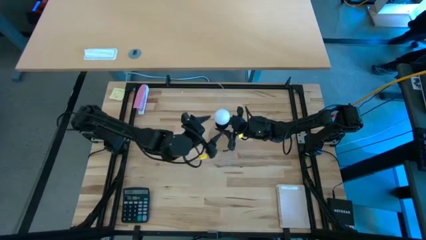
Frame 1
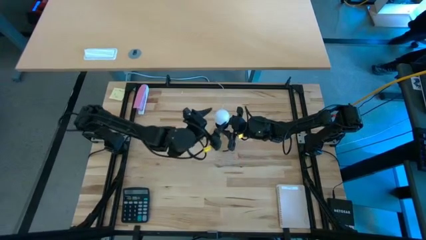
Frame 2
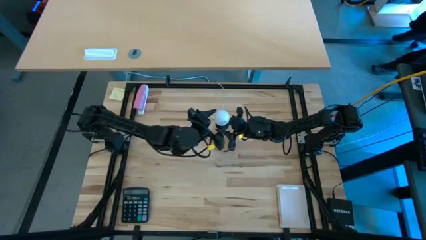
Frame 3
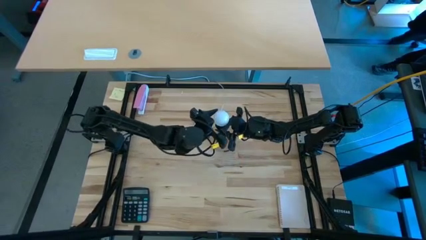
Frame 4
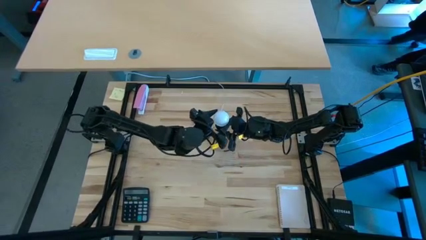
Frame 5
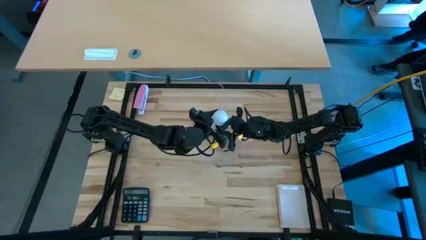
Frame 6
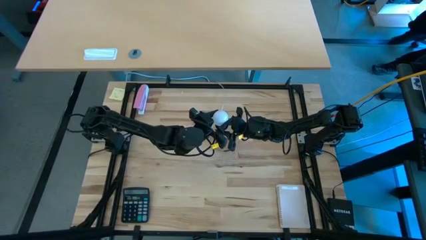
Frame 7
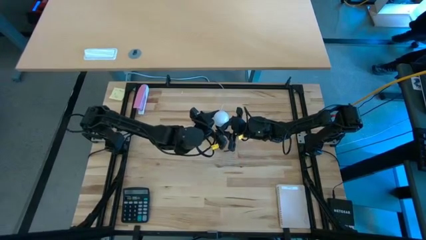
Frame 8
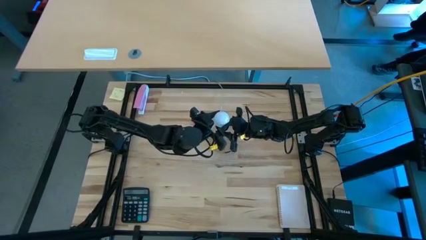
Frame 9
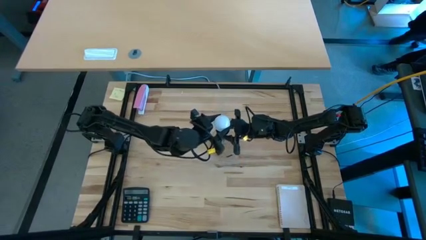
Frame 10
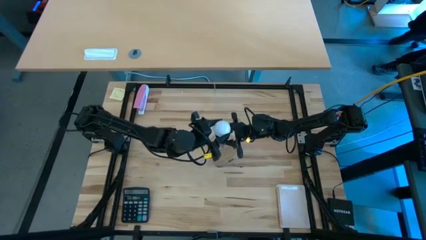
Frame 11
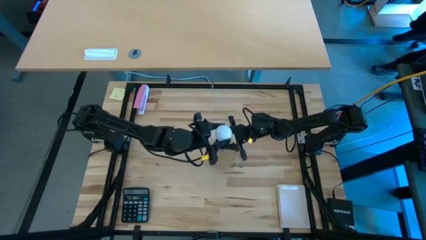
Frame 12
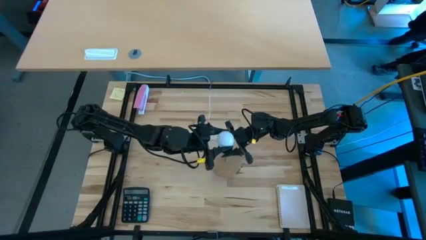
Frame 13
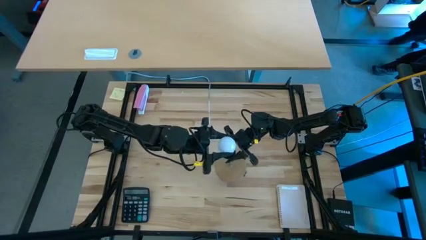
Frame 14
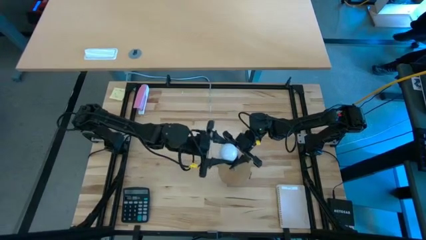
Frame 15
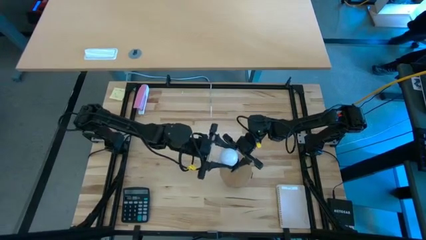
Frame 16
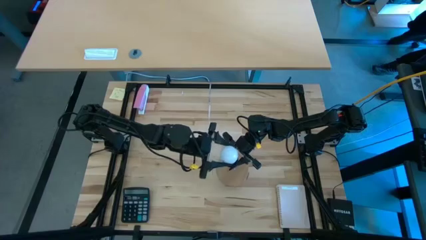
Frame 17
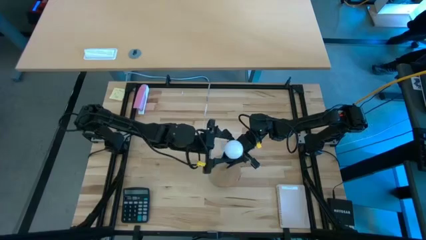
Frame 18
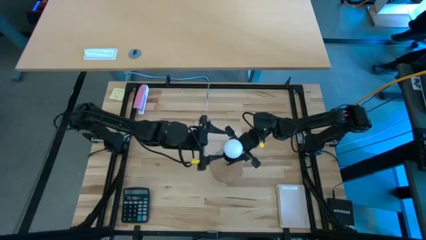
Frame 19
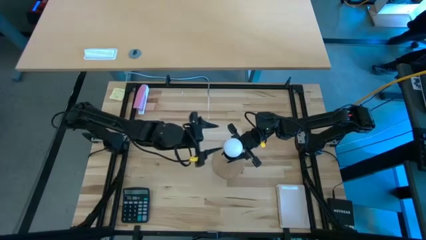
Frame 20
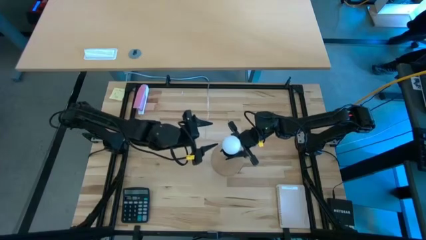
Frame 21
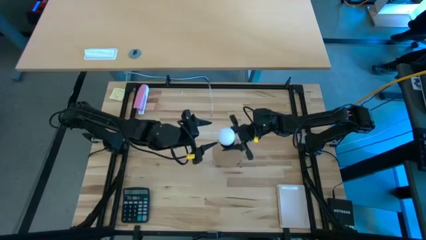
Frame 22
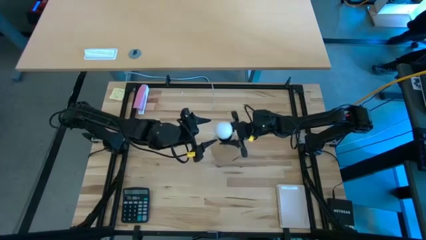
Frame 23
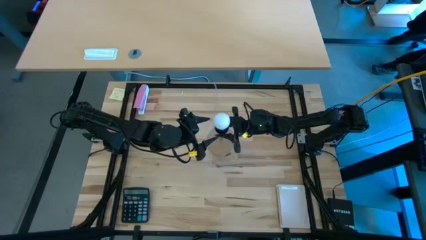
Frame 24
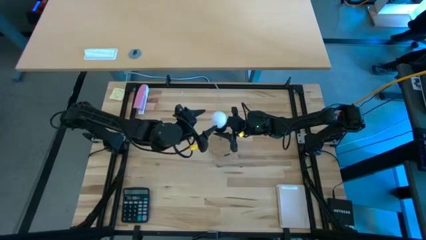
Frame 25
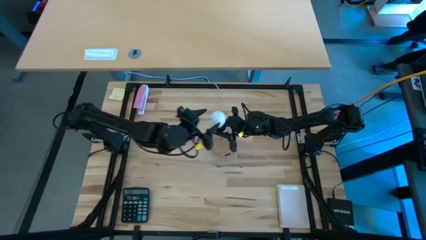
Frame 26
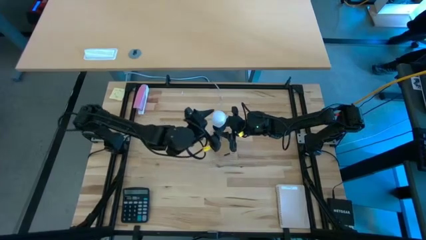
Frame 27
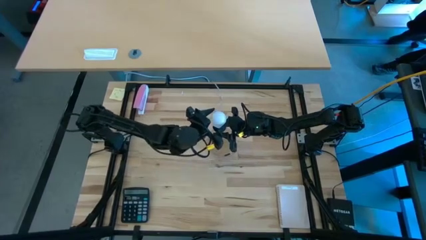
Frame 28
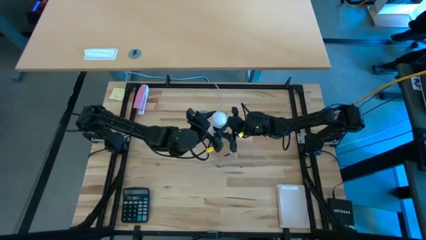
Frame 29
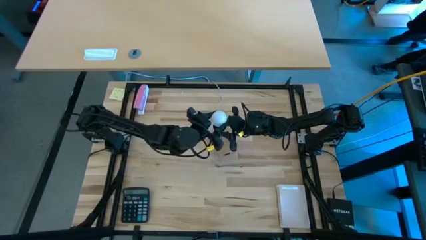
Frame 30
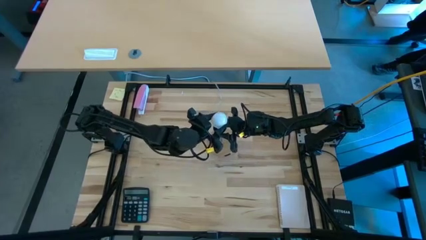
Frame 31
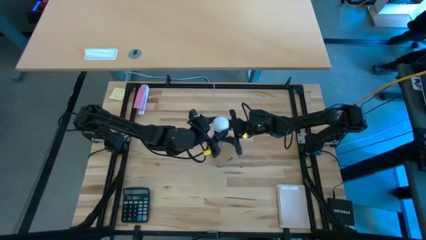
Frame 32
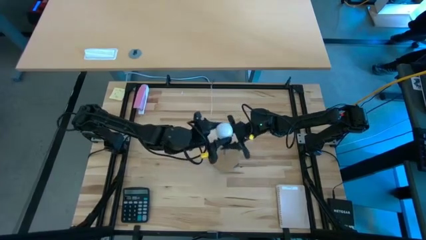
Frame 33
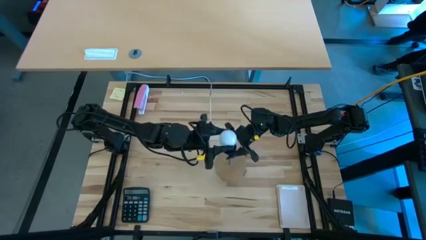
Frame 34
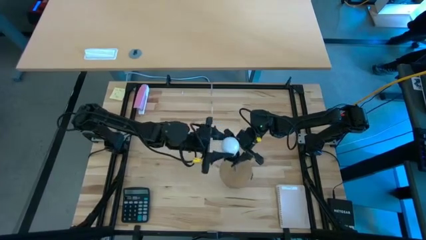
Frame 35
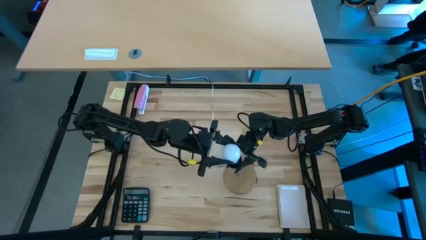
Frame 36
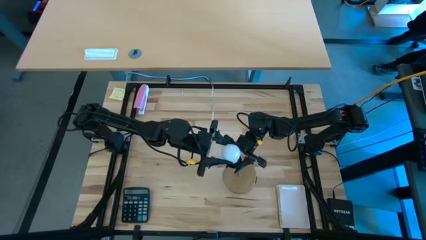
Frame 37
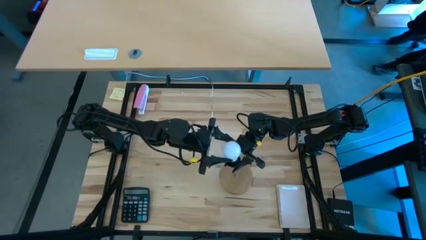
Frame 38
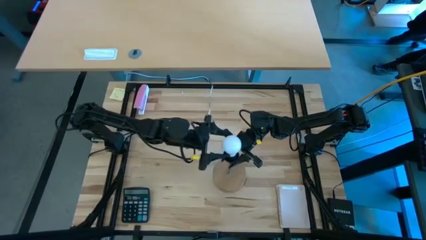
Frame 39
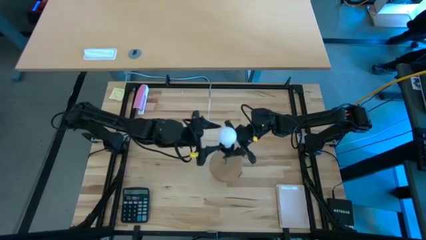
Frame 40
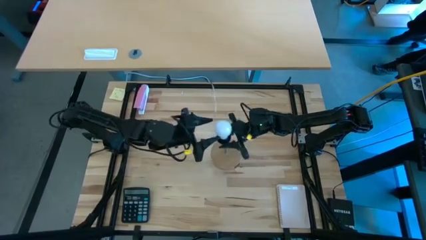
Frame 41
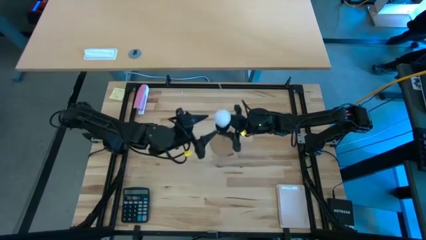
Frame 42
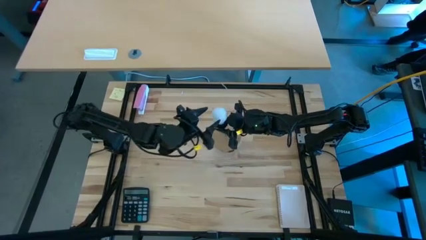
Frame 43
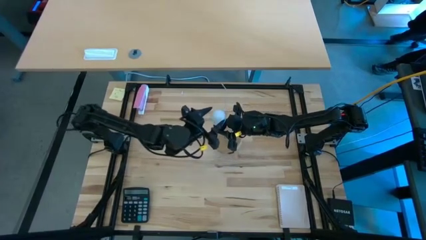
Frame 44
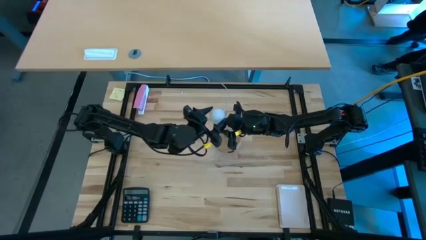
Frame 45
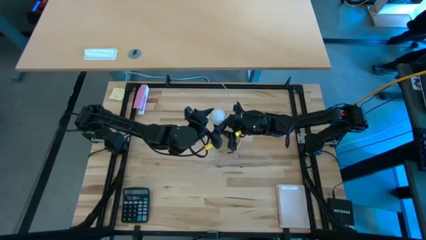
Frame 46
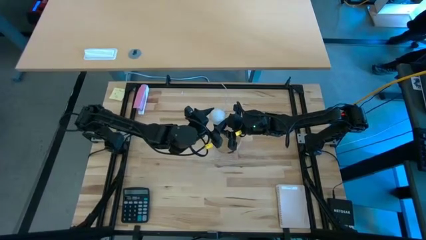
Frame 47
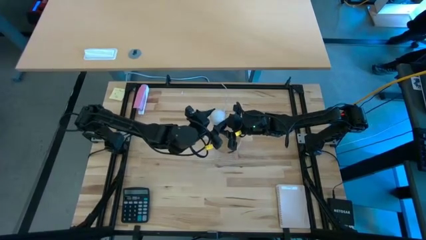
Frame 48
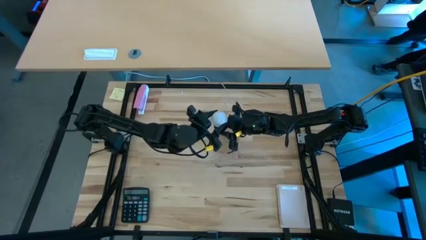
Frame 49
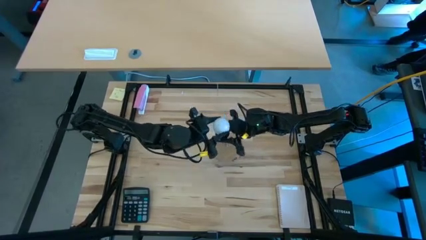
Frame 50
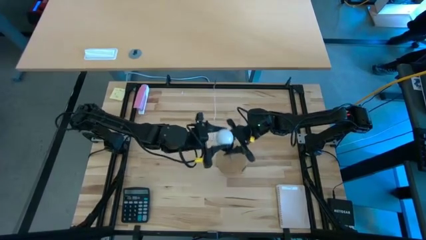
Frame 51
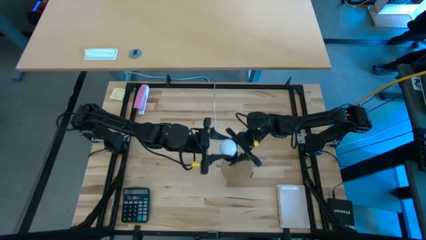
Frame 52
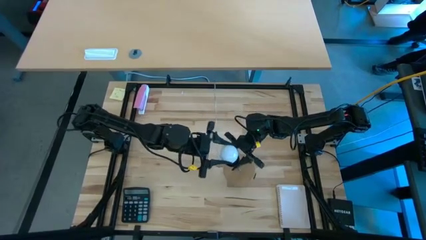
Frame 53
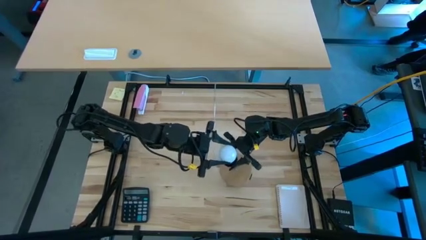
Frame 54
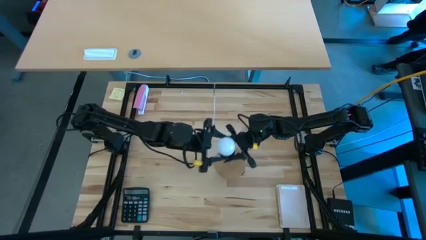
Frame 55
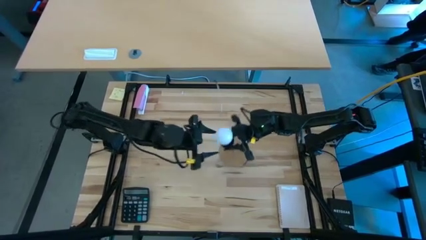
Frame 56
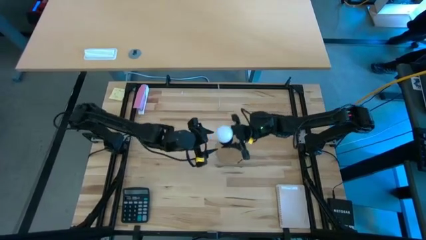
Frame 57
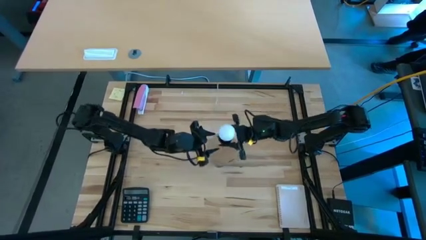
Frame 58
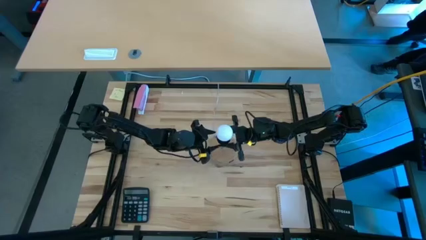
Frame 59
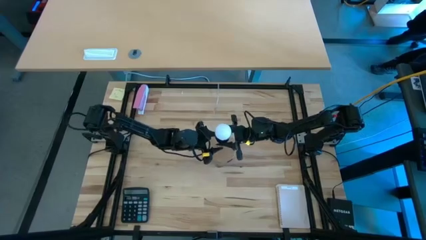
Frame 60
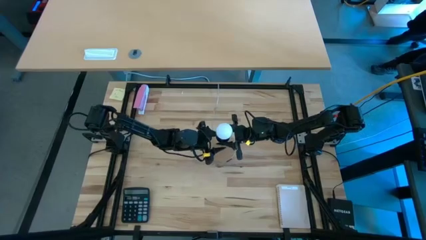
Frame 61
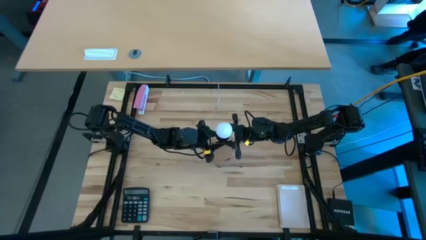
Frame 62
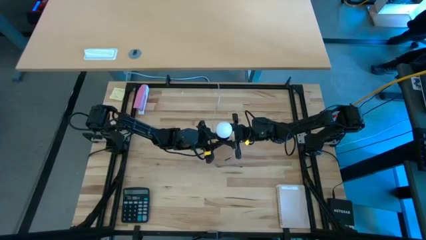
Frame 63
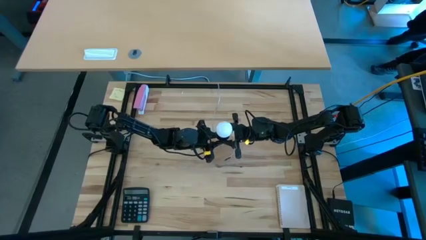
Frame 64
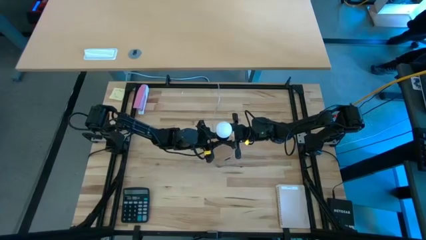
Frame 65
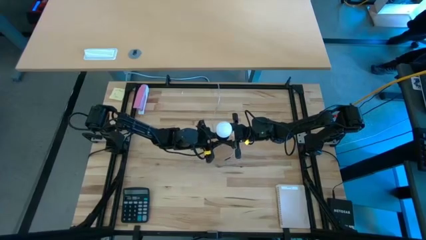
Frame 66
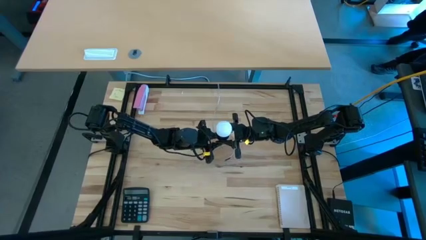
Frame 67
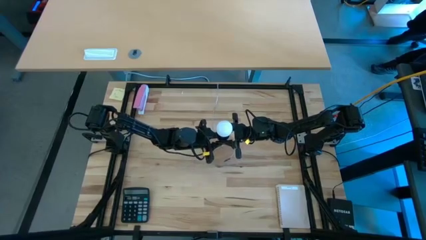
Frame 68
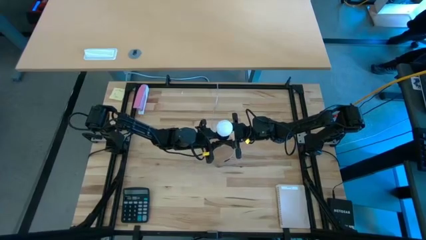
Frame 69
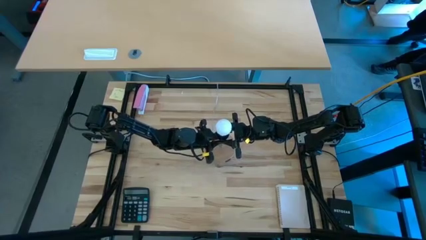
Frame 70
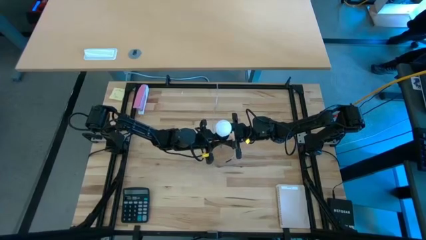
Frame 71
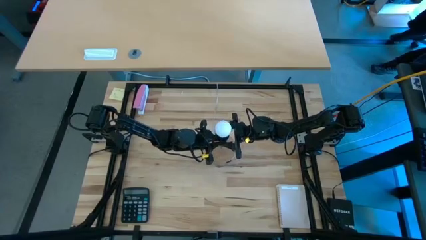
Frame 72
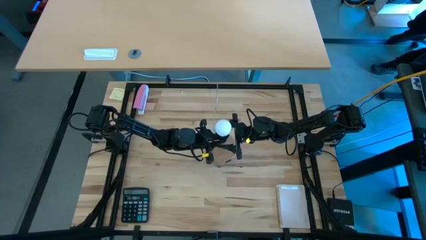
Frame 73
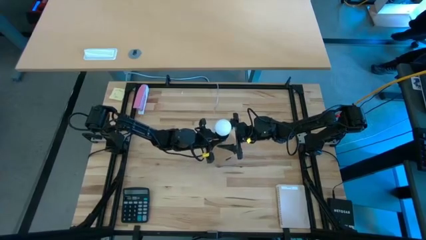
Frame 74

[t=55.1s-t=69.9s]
Task: Screw lightbulb
Insert the white lightbulb into the brown lamp
